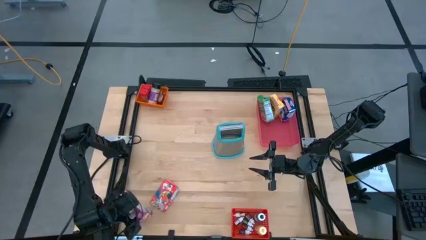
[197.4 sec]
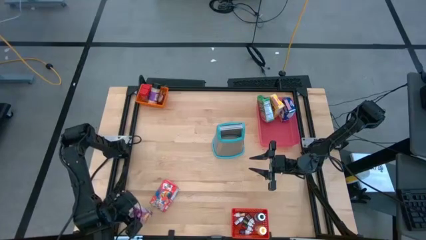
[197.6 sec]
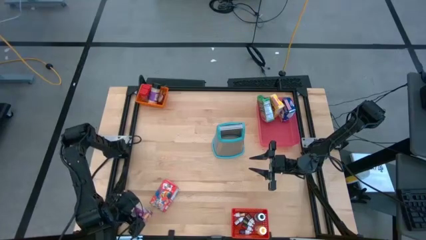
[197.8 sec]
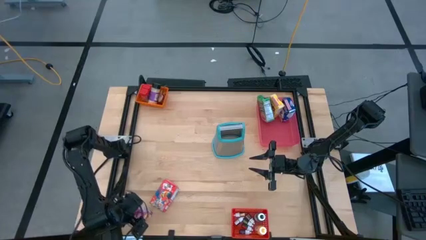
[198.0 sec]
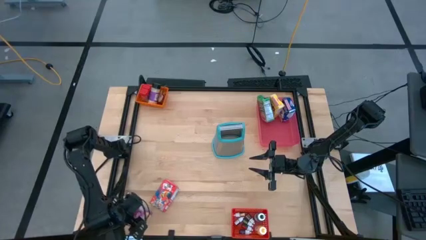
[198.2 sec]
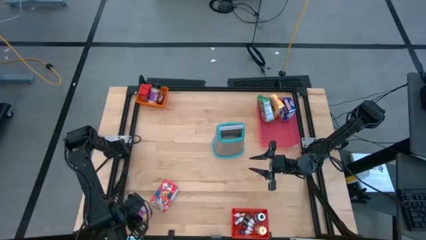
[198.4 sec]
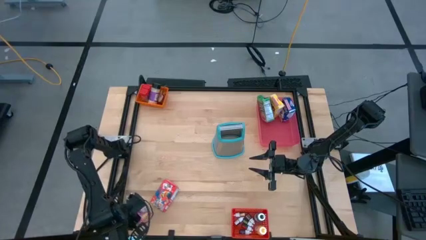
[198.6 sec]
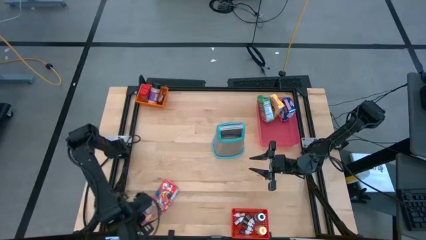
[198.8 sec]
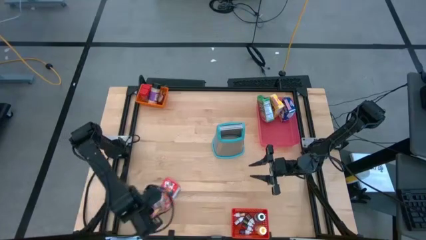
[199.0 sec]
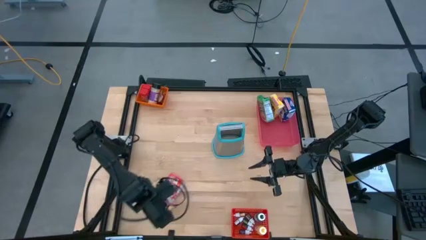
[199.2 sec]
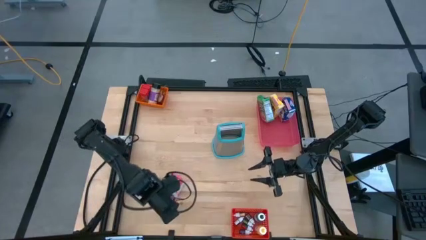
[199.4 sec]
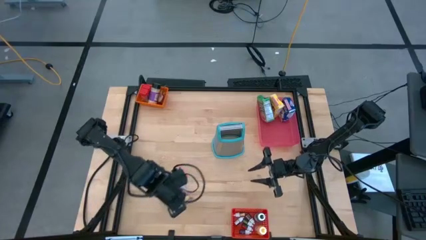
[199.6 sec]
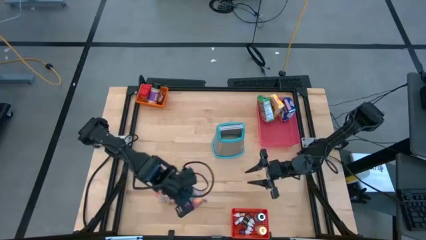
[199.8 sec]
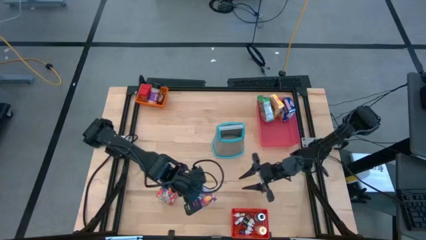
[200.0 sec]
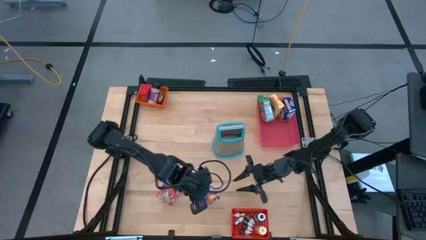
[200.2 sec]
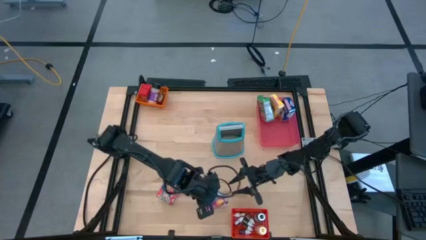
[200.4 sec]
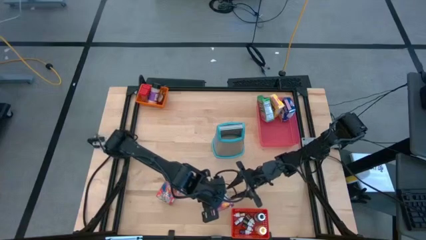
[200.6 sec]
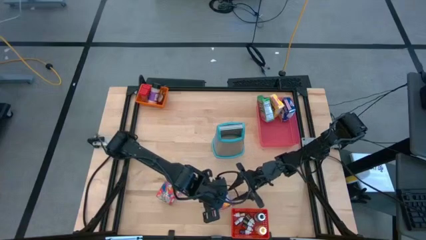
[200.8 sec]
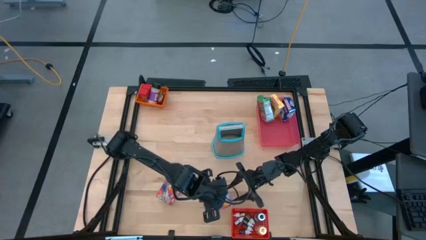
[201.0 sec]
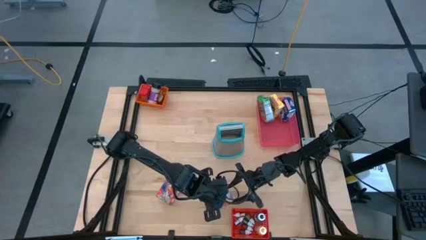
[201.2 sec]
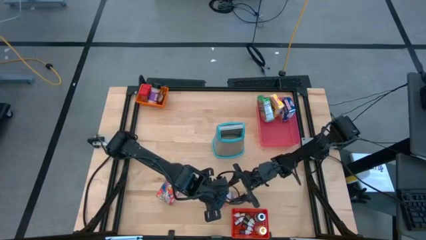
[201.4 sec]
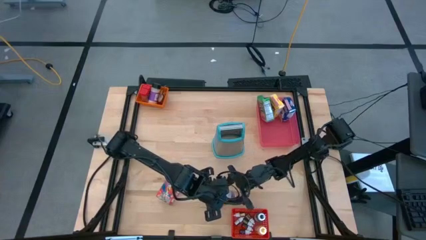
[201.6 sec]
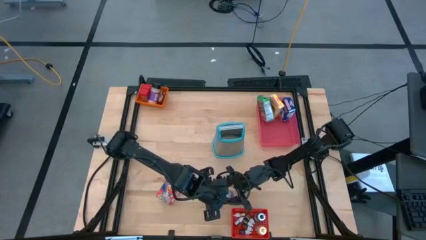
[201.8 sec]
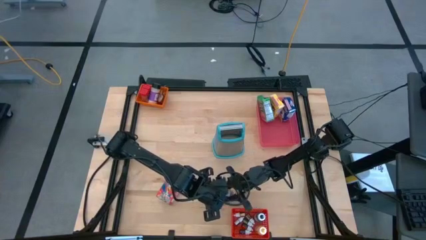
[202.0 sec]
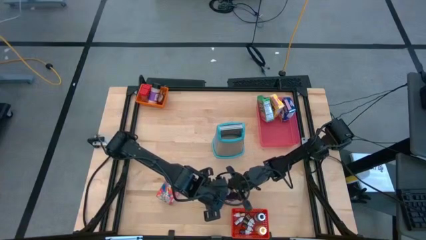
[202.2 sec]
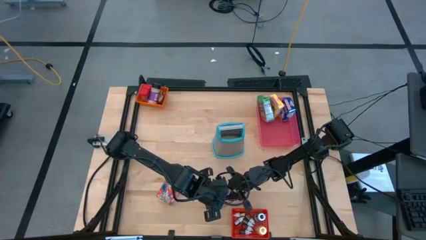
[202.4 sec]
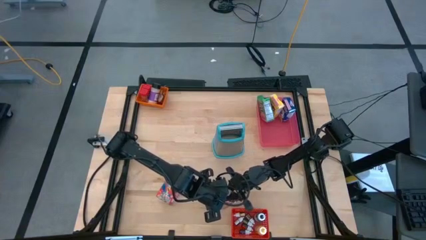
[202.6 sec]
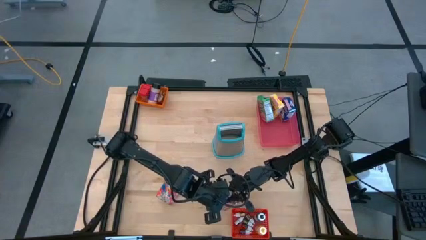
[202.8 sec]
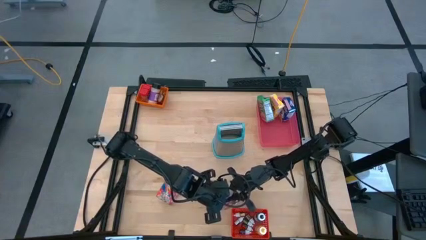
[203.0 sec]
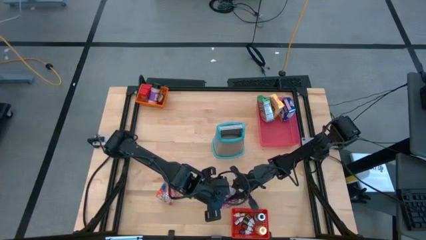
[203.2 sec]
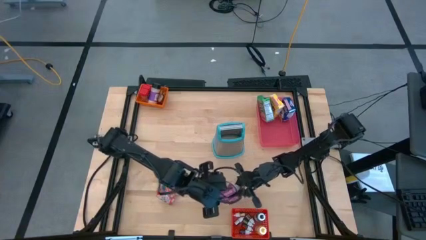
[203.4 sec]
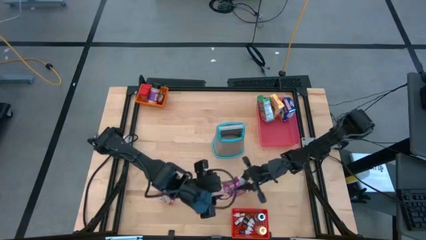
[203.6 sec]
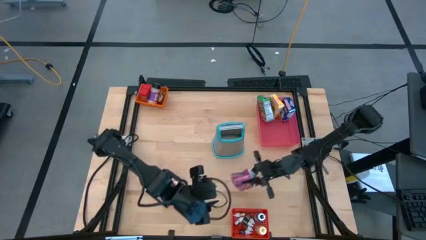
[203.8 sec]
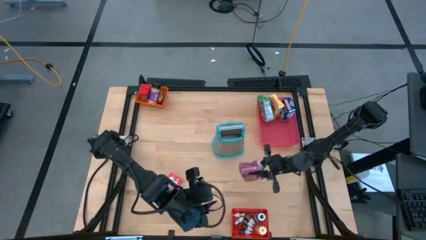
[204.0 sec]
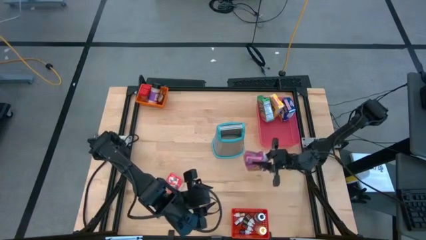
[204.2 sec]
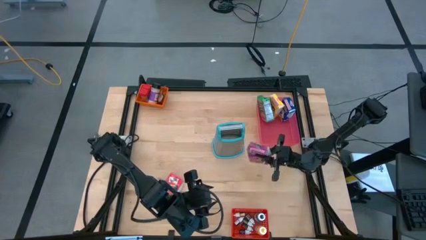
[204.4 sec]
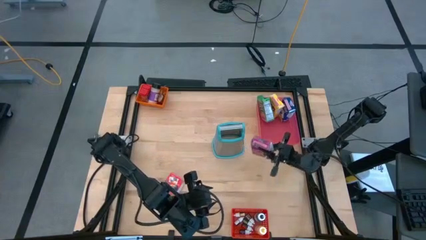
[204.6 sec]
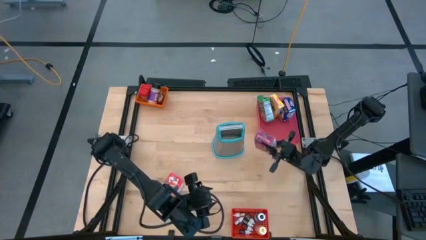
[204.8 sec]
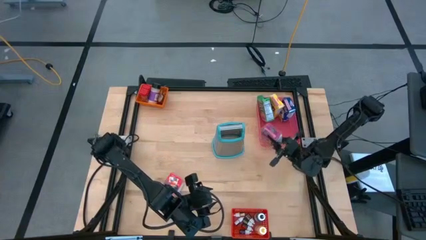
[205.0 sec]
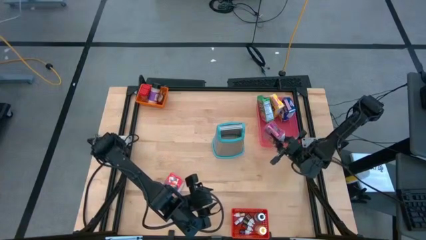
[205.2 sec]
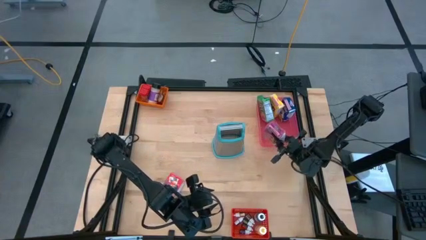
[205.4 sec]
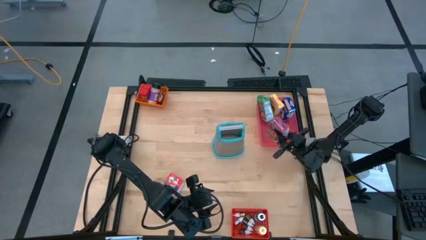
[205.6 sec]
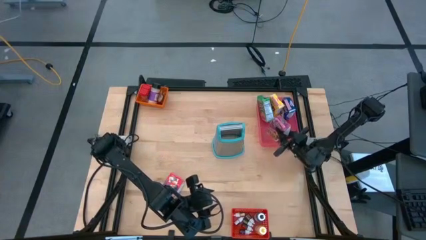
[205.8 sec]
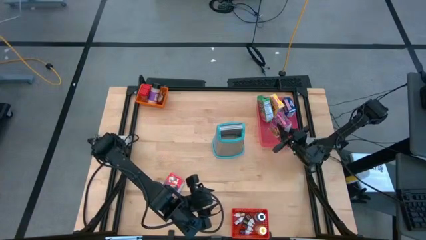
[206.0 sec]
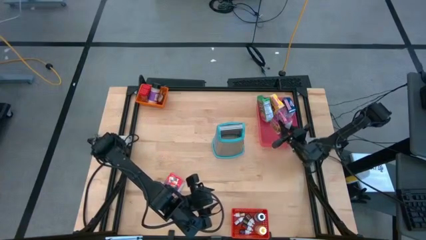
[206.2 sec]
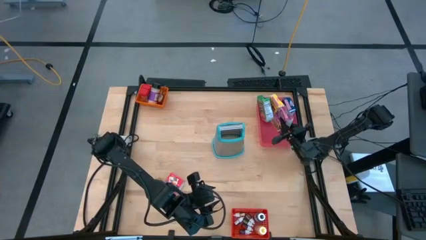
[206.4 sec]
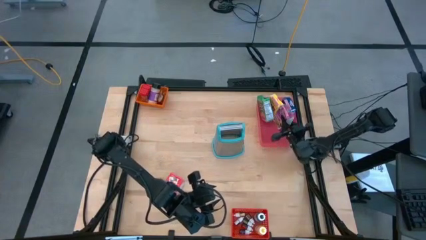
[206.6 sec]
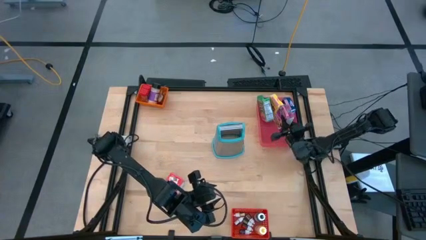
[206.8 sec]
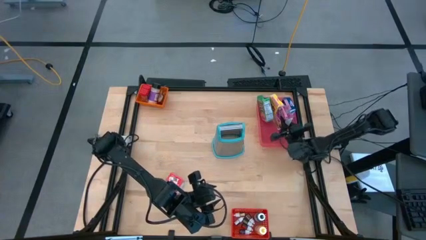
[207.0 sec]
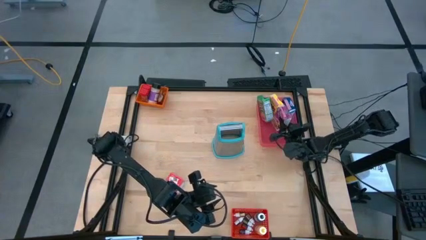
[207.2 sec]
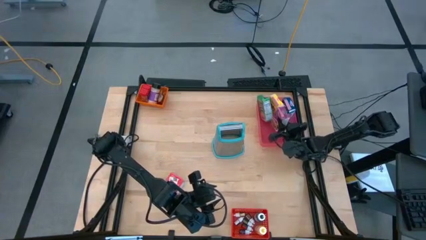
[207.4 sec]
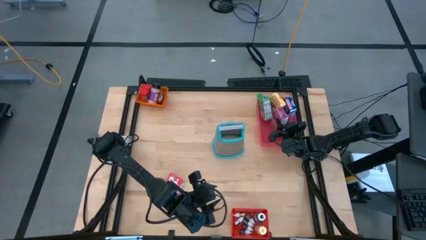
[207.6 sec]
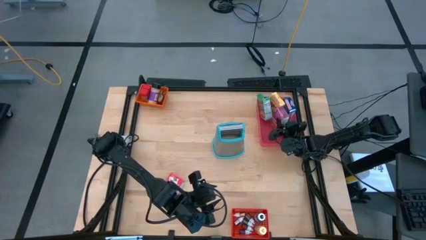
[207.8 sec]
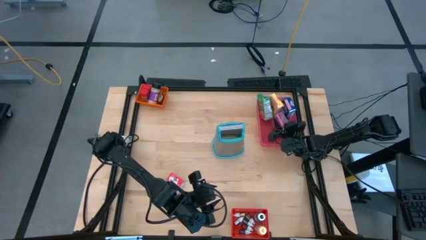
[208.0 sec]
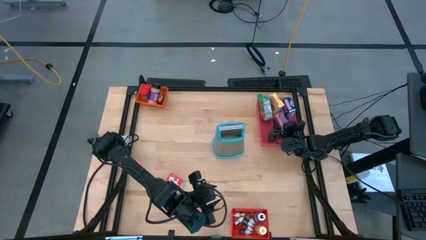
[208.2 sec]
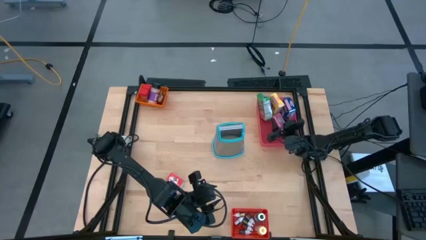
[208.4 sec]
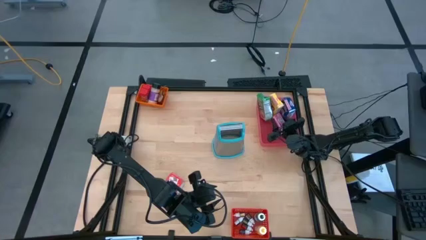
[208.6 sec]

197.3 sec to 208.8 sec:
Task: Pick & Place Kitchen Items
Put the purple cereal box into the pink bin

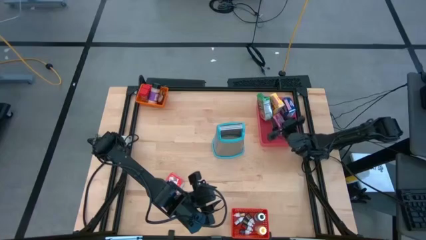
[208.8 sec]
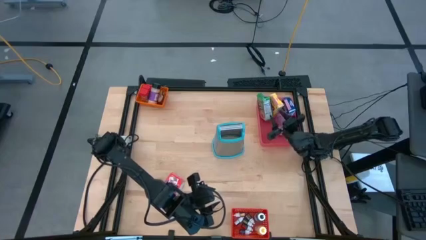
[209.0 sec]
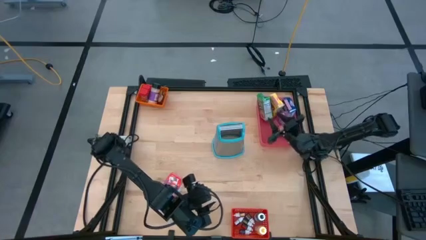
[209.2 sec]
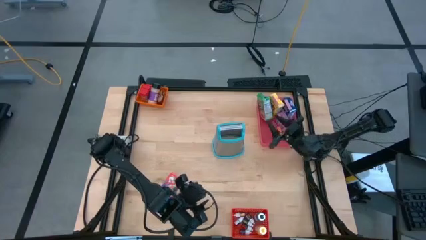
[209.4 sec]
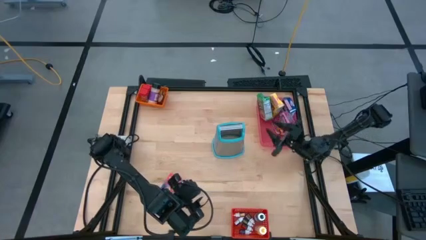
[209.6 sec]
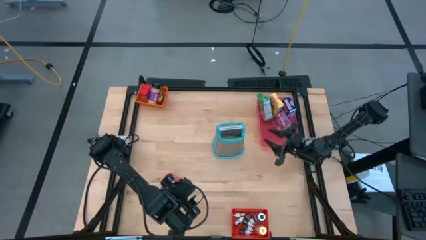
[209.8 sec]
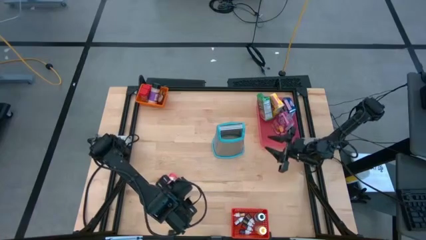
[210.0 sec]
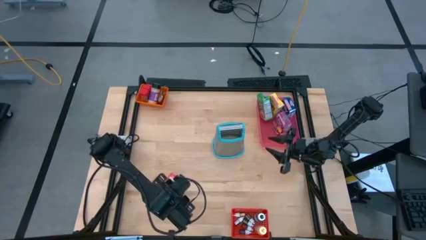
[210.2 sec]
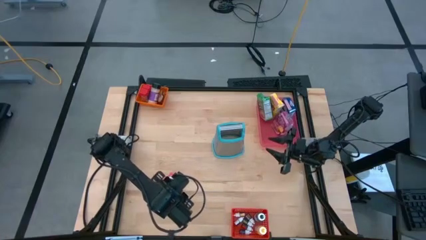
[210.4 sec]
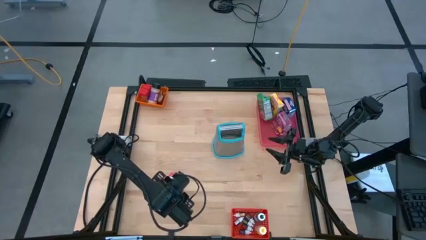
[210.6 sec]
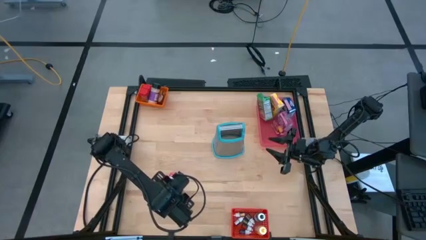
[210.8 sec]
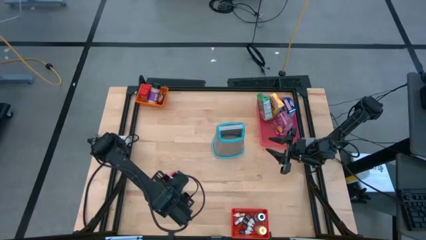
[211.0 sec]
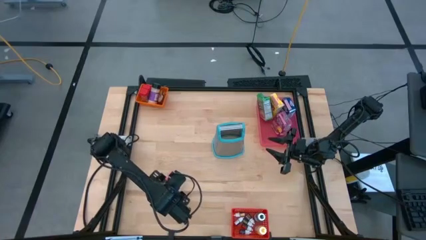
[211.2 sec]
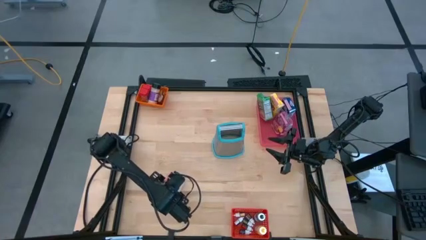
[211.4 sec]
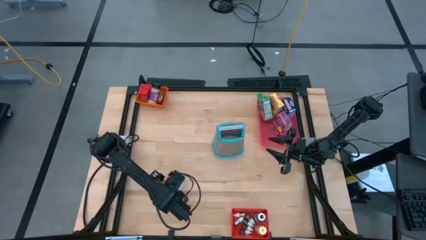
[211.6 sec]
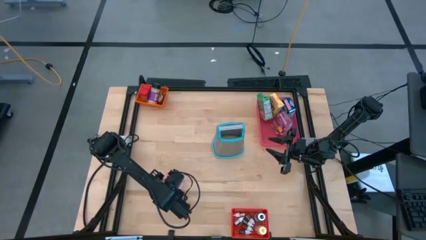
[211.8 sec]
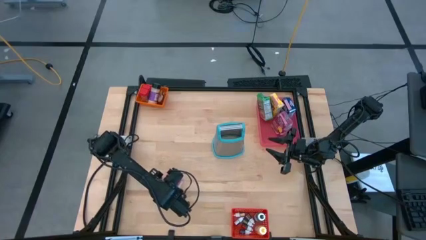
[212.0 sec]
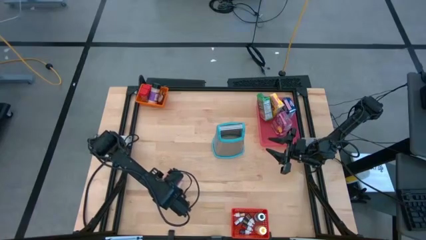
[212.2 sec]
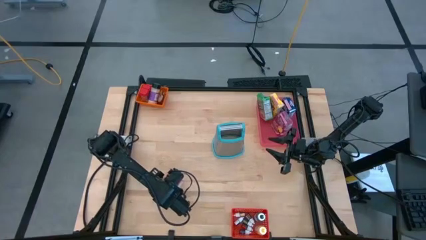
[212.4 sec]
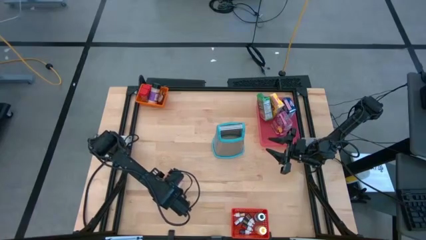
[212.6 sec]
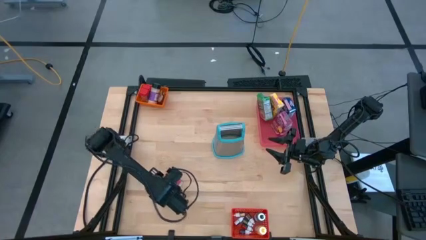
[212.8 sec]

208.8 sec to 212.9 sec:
Put the red cereal box into the pink bin
